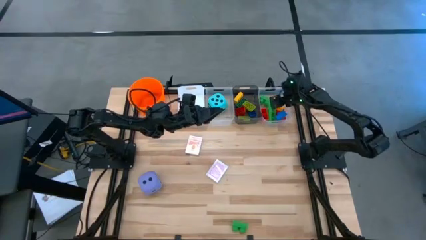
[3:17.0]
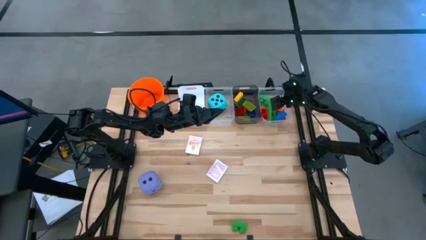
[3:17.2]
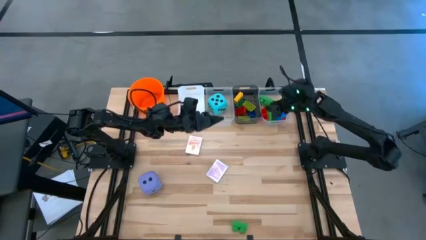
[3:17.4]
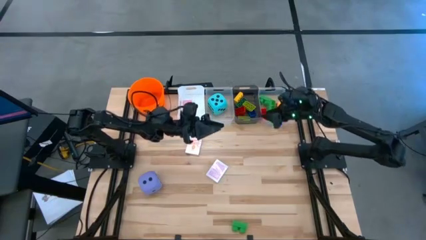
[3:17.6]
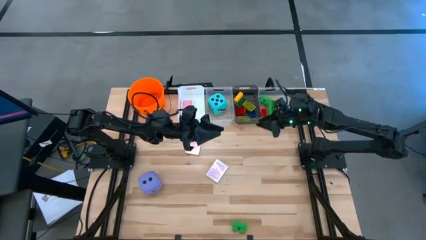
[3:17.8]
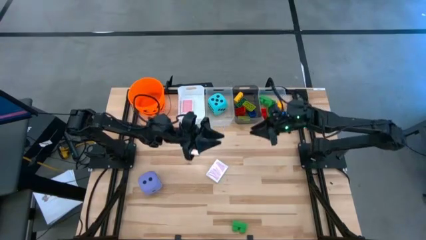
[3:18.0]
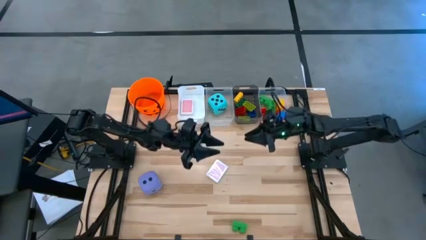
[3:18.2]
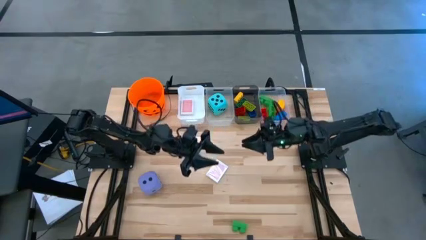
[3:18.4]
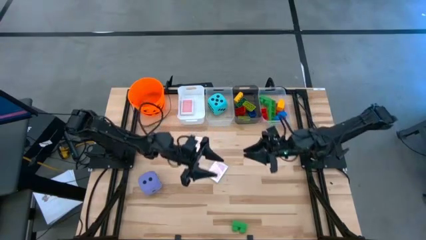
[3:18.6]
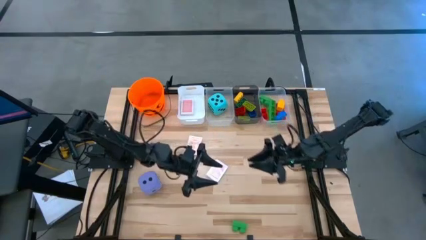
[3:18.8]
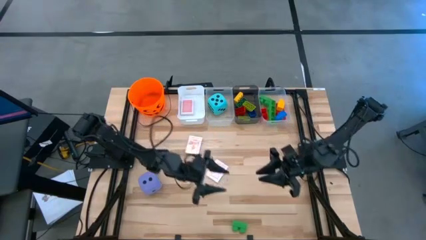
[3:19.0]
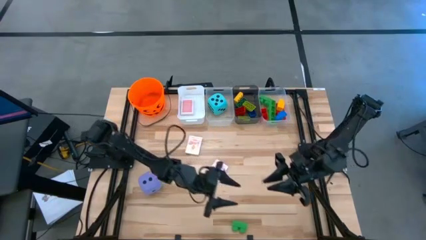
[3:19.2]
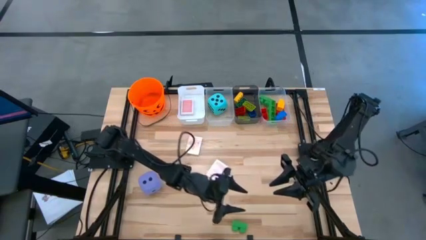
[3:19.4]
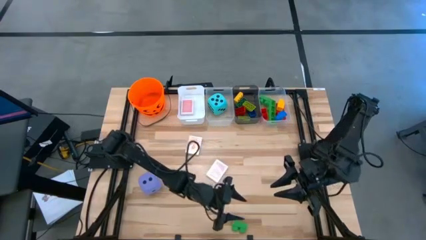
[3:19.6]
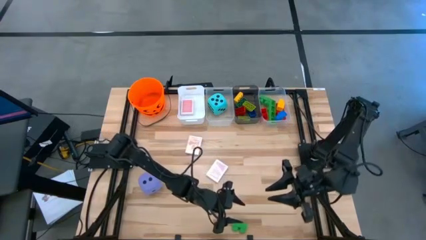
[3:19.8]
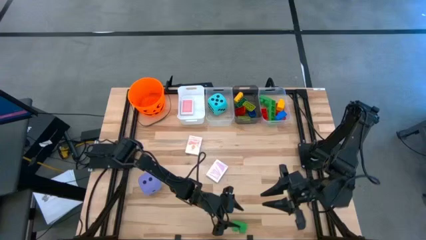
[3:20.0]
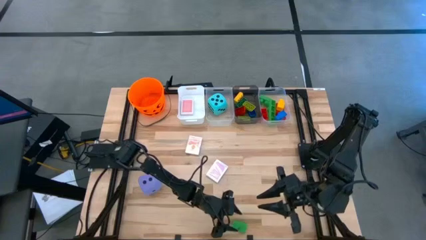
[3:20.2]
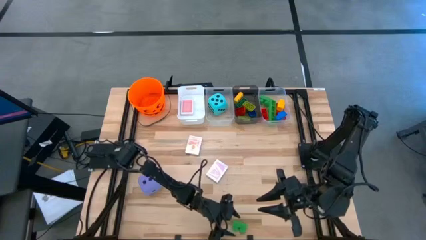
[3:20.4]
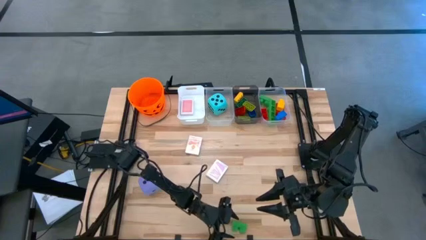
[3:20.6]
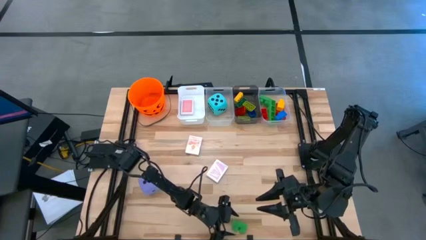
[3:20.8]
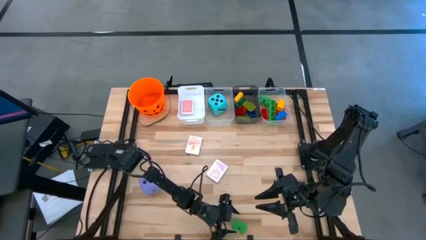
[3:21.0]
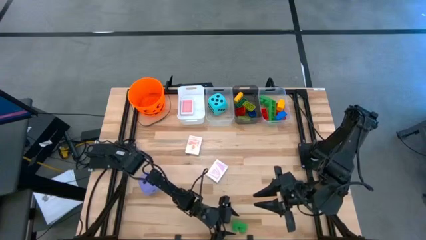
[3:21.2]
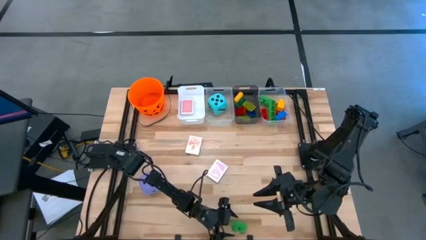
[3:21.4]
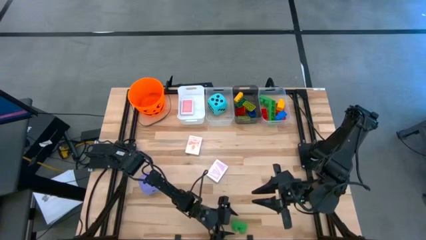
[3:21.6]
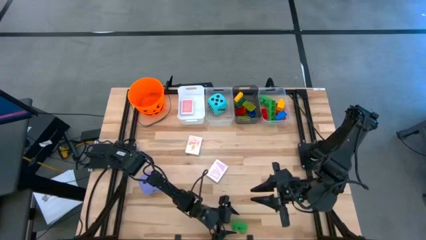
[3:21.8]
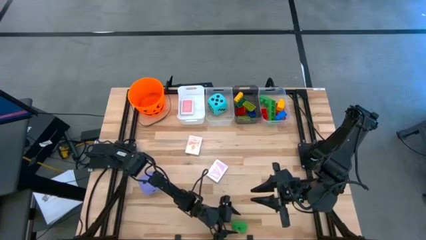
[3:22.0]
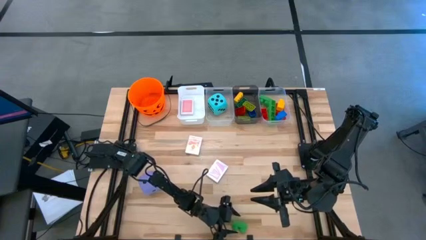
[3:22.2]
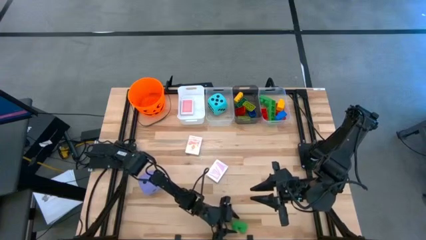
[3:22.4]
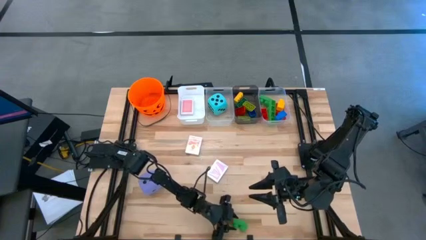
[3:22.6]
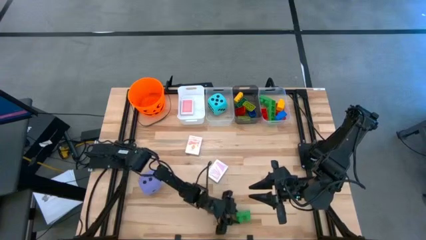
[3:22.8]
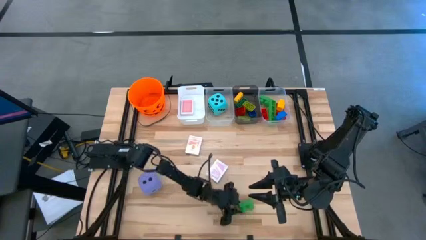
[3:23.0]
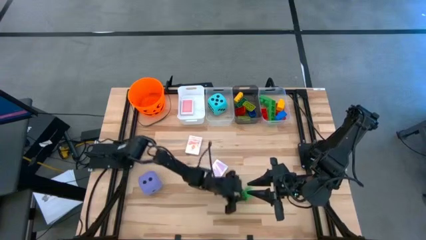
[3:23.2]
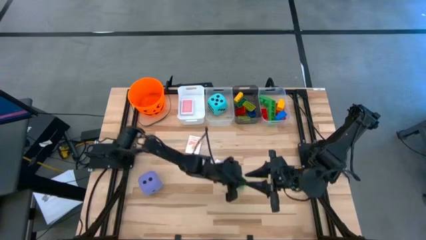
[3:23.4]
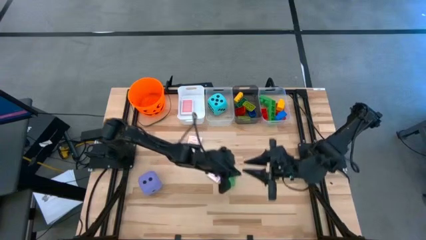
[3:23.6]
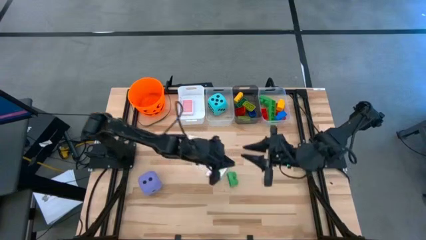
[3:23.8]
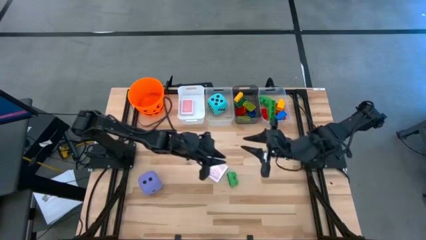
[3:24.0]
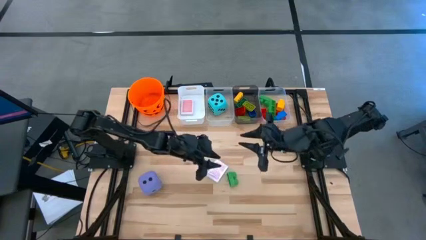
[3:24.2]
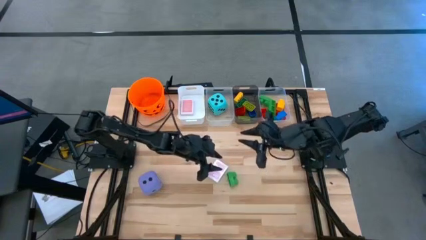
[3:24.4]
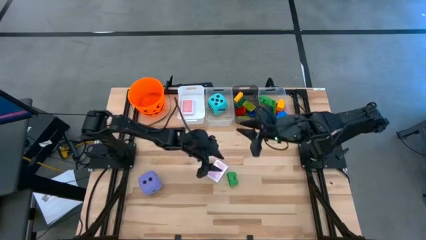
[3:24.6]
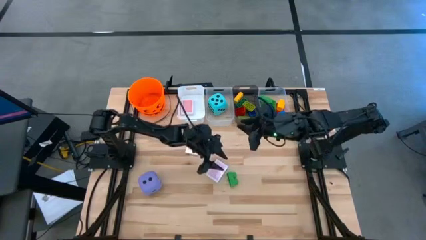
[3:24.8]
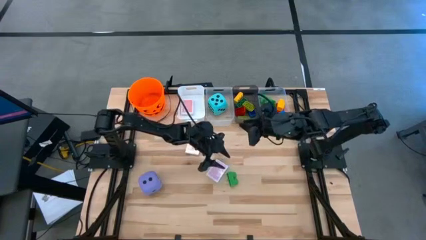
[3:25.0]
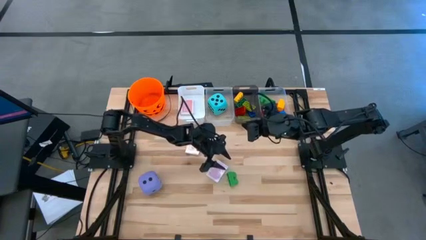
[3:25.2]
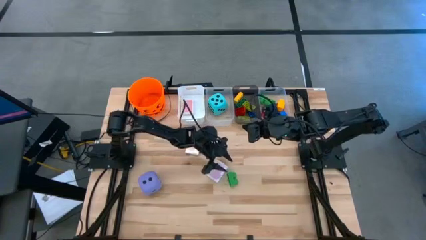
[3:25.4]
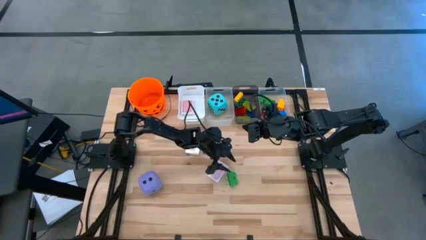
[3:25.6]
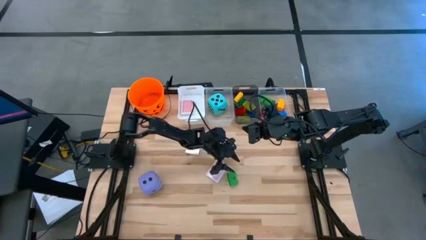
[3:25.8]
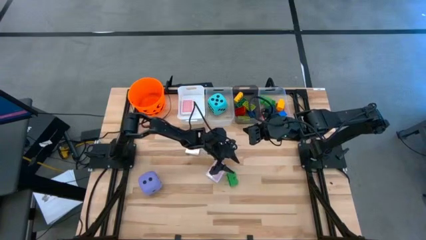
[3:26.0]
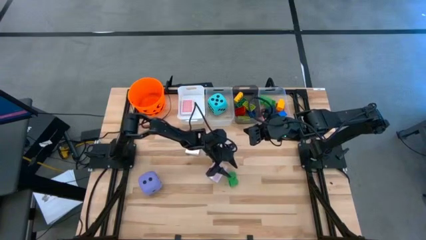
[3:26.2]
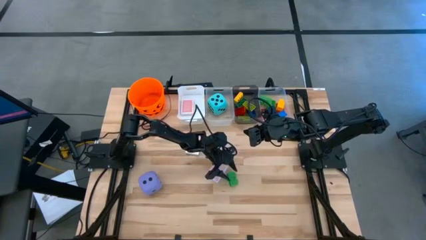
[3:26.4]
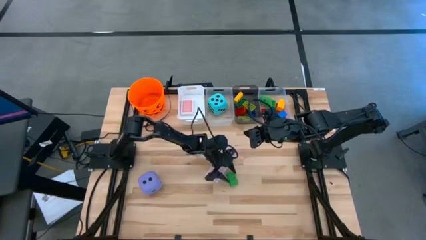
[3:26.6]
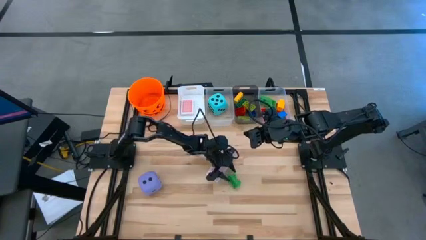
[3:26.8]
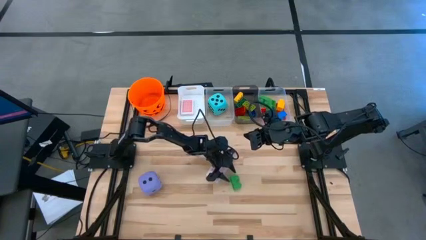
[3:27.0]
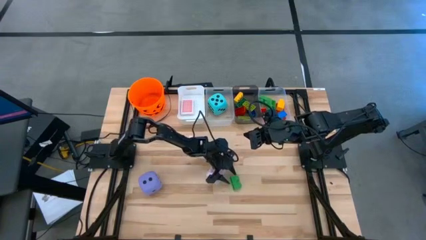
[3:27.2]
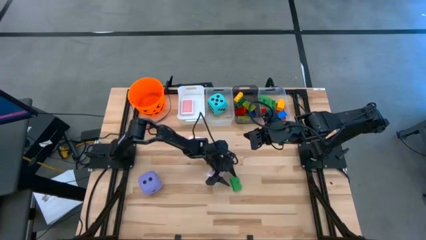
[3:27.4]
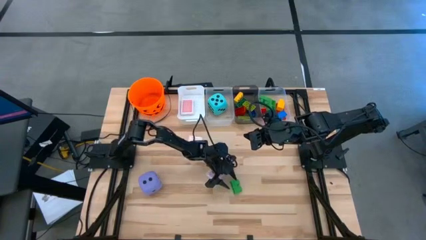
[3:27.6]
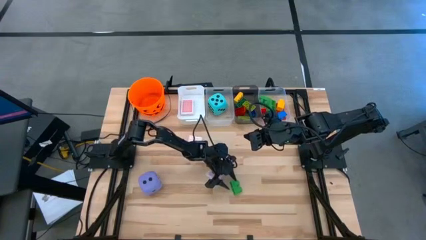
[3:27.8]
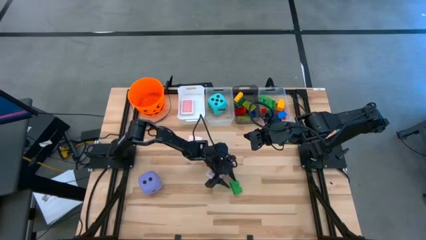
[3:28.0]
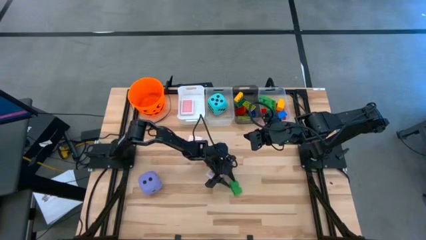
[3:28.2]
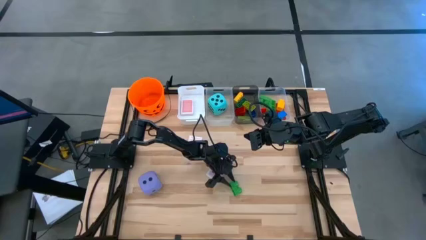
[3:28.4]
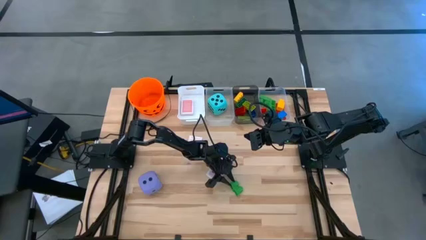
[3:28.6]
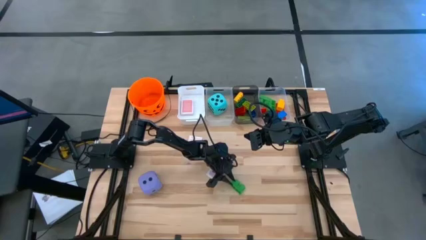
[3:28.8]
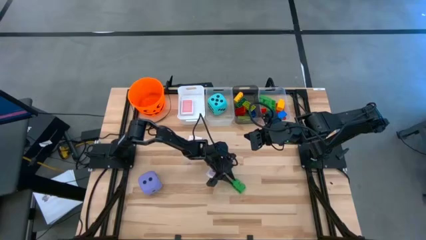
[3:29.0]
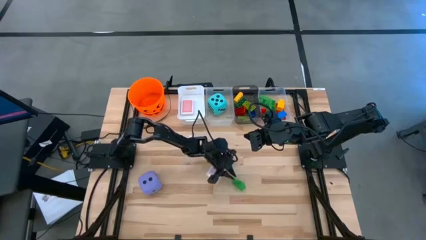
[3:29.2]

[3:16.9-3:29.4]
Task: Pick & Place Toys
Put the large green game piece into the right transparent bin
